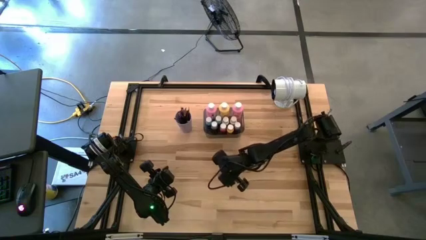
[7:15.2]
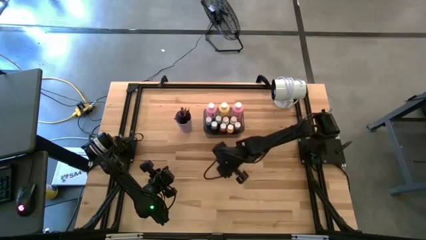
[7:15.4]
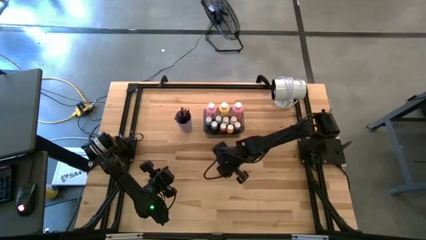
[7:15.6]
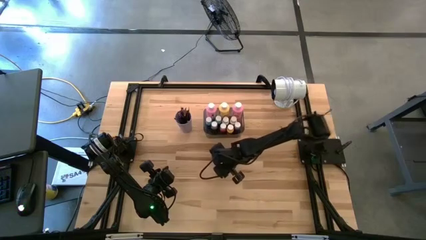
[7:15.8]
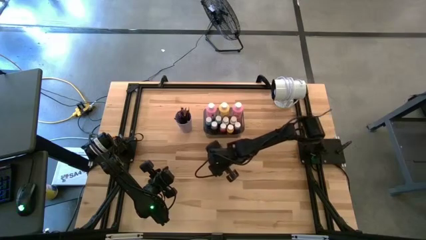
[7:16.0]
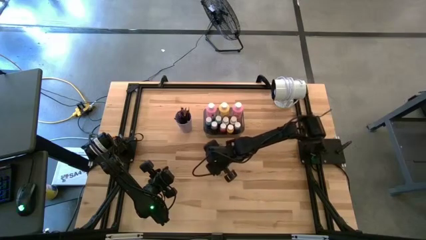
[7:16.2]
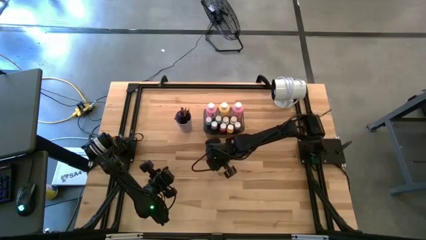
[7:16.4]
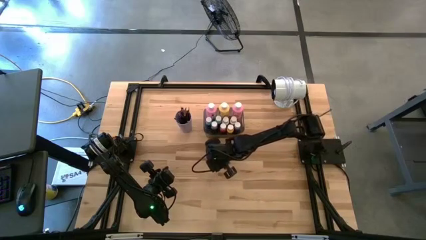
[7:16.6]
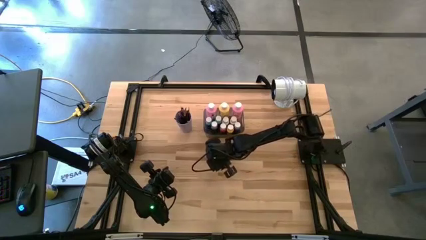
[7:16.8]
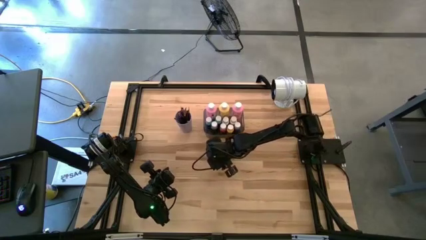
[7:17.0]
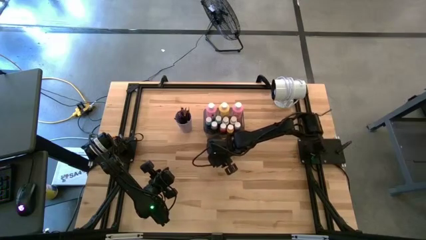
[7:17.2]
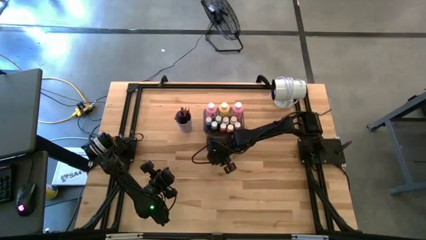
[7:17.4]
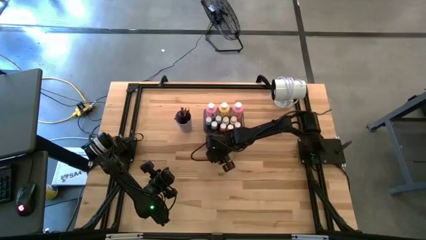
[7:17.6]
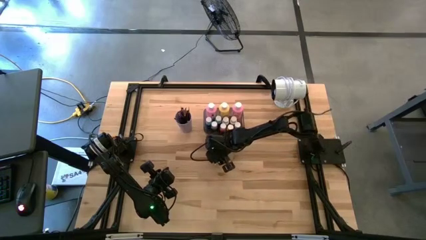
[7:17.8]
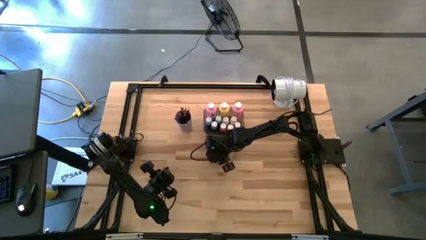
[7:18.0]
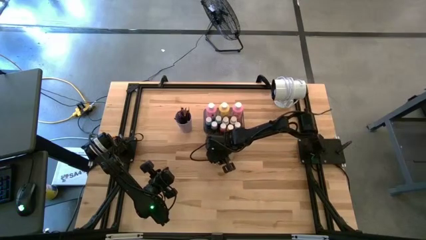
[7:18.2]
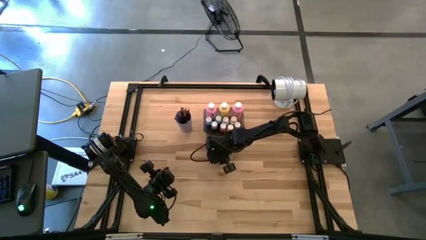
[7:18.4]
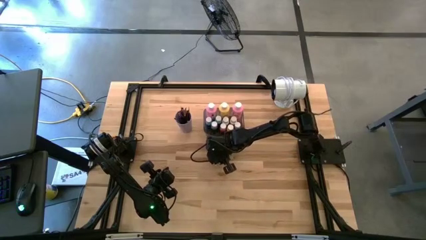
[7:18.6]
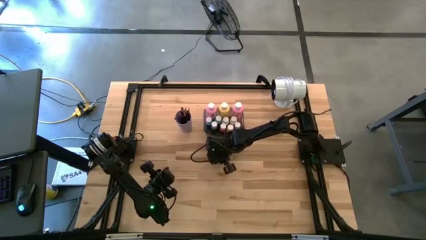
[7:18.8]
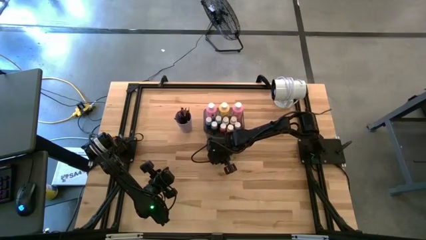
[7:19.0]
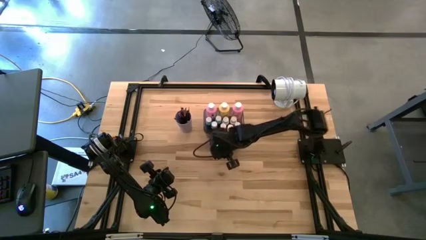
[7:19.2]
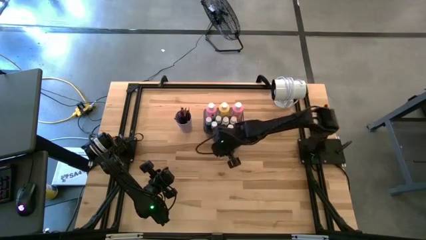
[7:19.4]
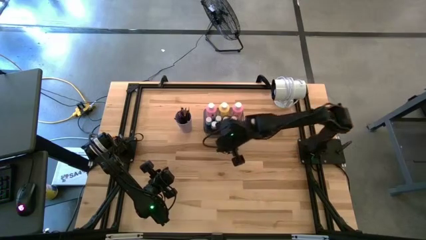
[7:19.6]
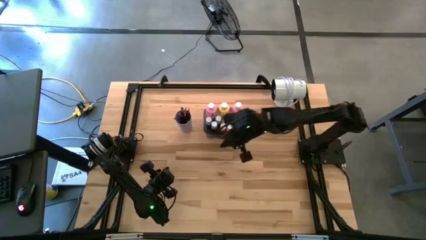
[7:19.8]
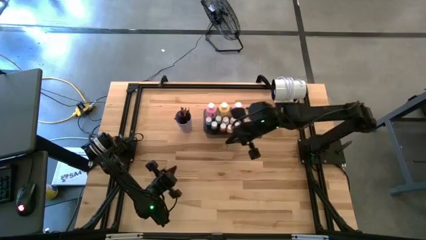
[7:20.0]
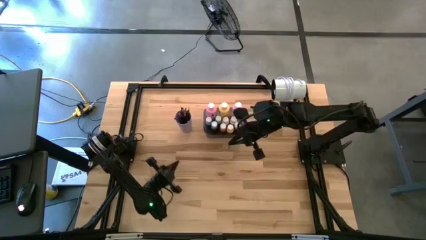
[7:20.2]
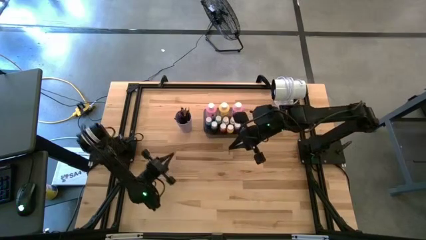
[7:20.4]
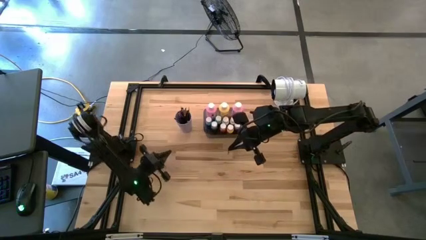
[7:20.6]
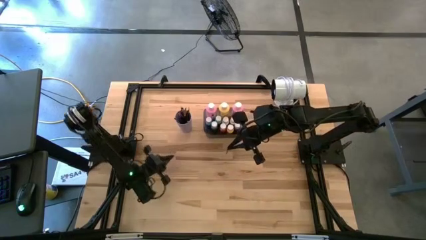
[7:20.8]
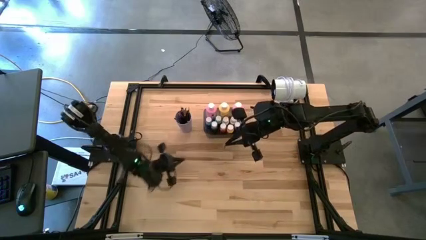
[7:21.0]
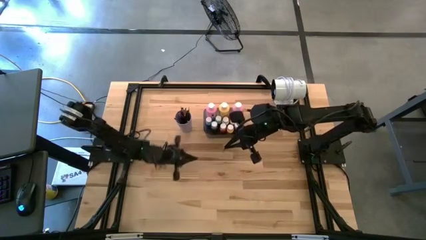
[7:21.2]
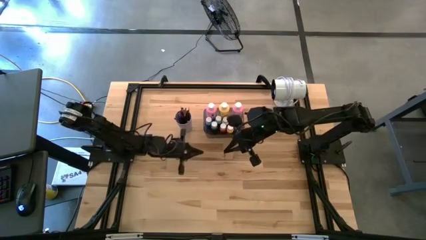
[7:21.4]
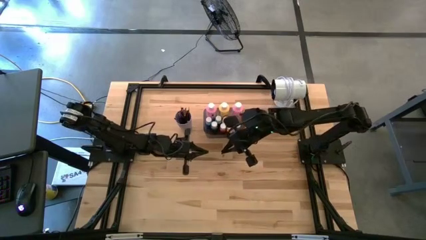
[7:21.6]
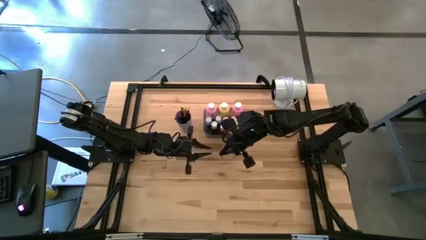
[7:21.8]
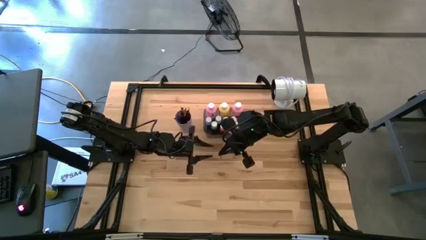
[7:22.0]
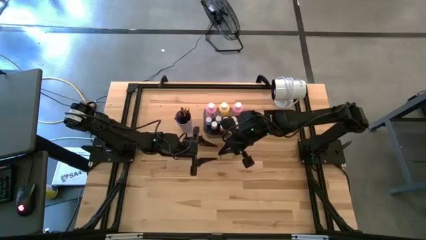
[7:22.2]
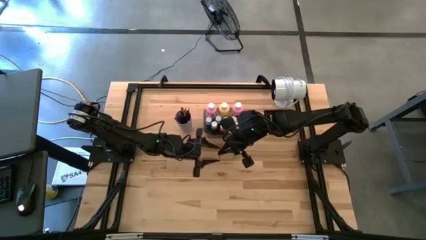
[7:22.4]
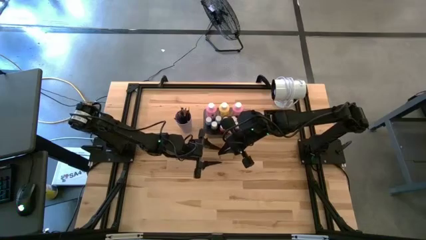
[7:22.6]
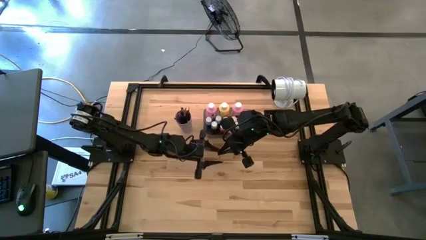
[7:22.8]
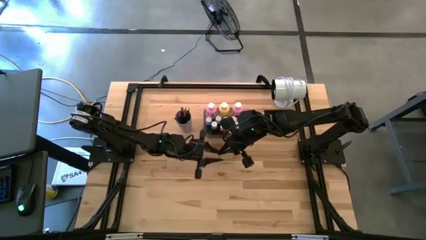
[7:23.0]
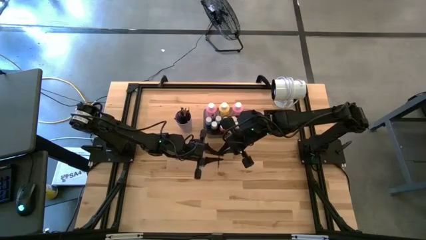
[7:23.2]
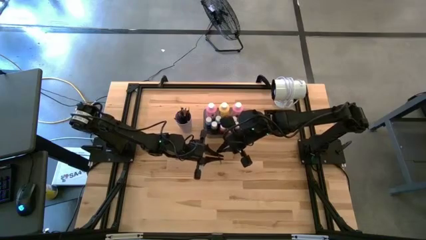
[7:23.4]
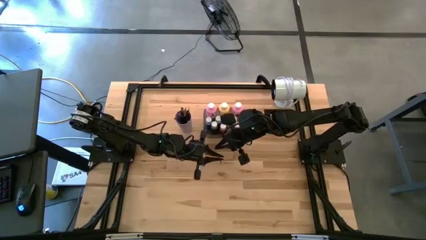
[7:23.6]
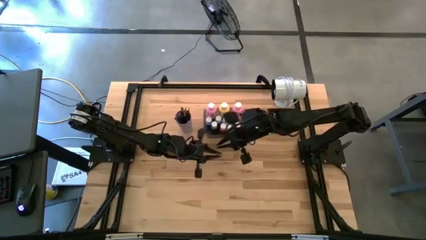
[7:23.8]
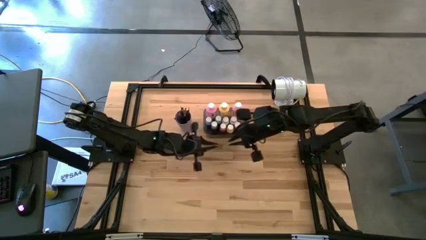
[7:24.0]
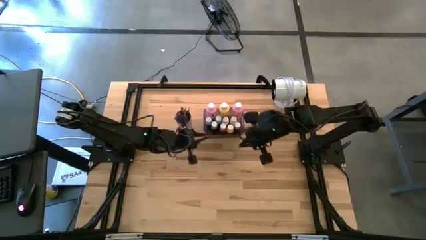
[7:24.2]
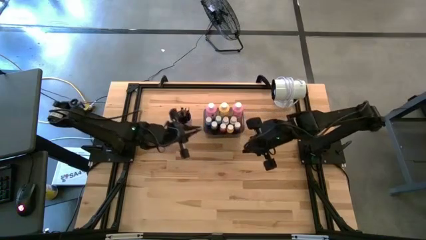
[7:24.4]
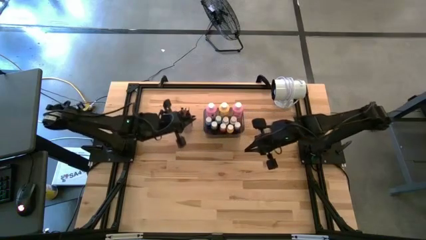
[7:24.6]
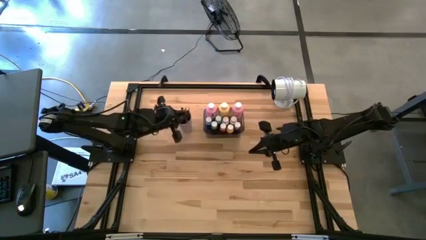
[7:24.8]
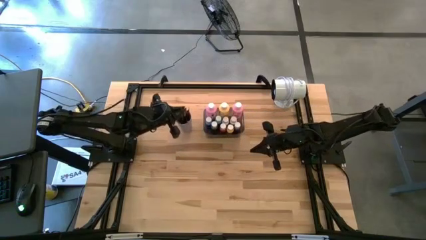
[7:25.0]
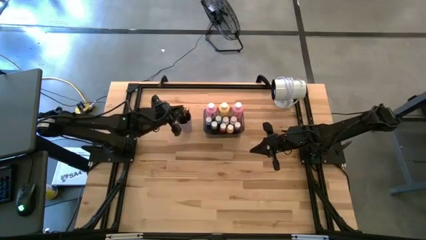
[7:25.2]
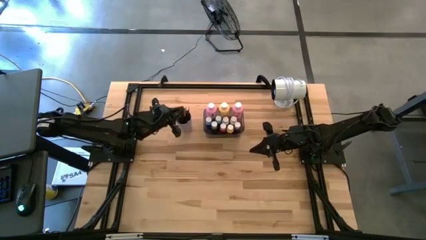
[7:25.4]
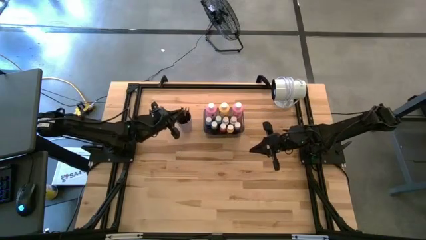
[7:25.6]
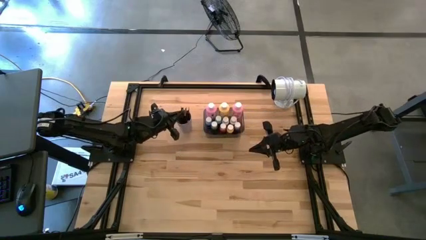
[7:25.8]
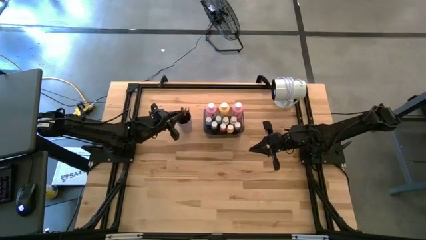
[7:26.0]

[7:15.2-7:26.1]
Task: Pick & Place Paint Supplies
Put the silver paint brush into the purple cup

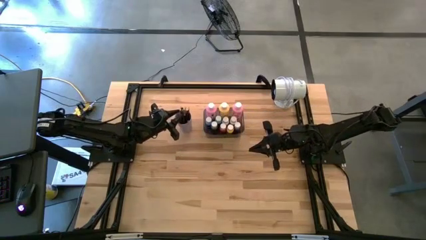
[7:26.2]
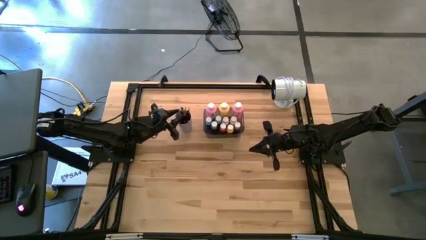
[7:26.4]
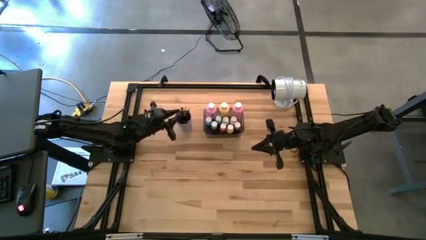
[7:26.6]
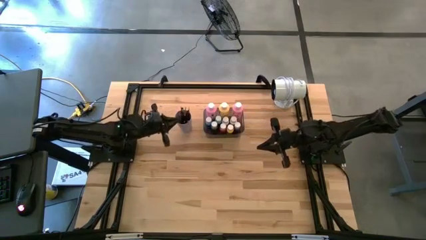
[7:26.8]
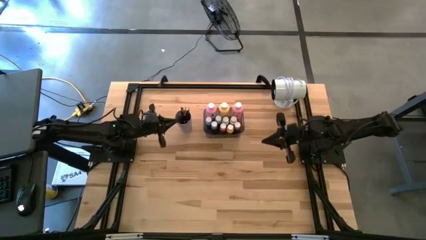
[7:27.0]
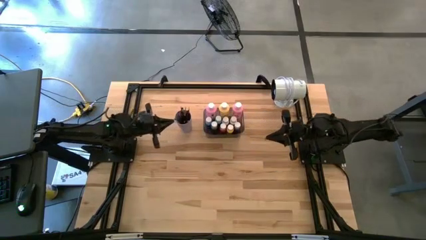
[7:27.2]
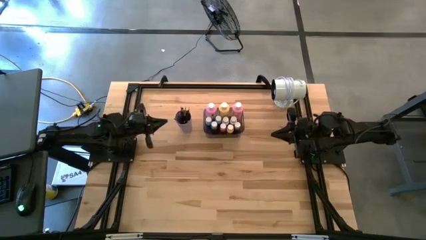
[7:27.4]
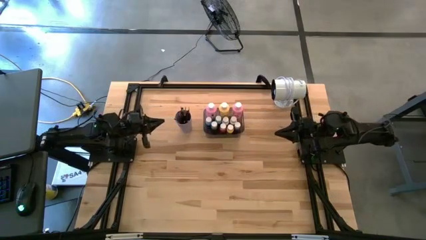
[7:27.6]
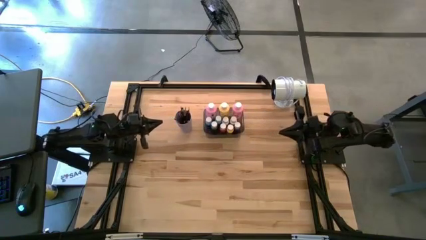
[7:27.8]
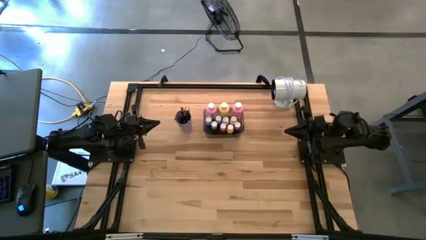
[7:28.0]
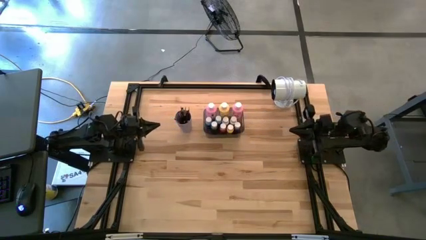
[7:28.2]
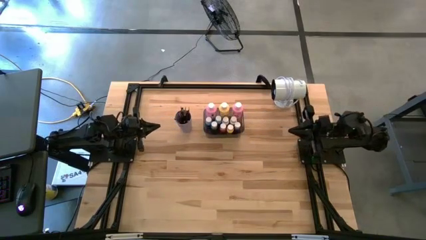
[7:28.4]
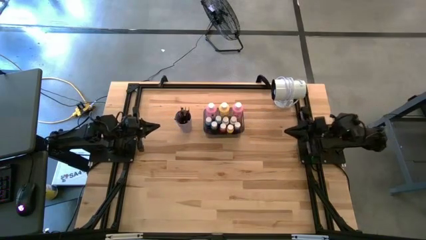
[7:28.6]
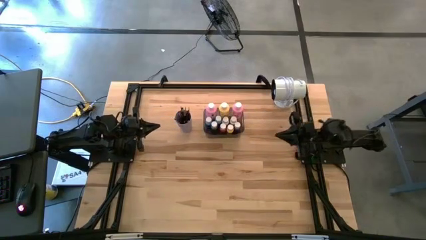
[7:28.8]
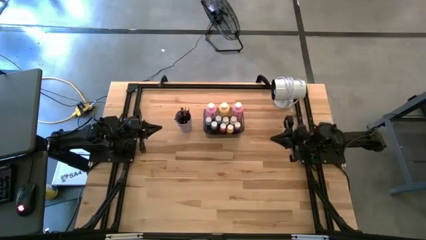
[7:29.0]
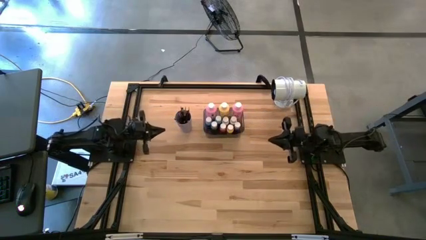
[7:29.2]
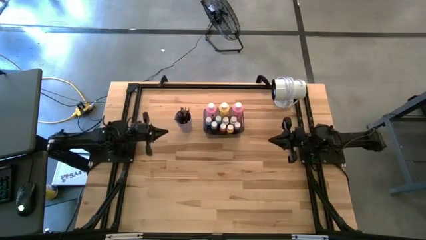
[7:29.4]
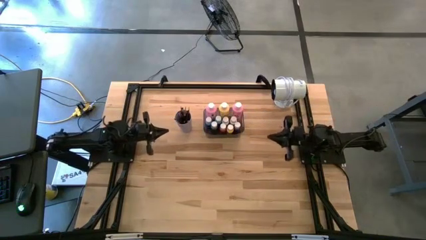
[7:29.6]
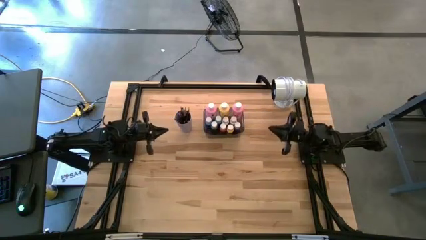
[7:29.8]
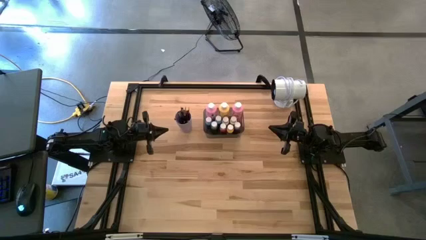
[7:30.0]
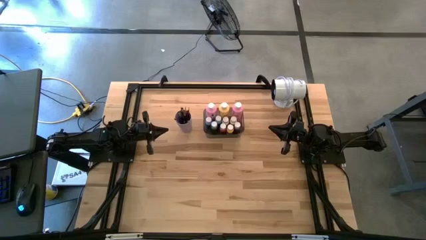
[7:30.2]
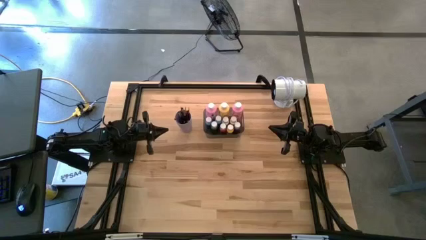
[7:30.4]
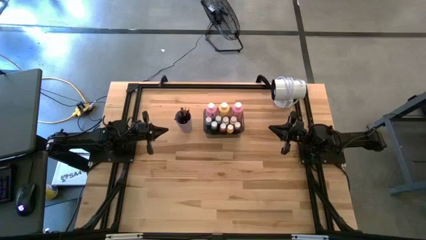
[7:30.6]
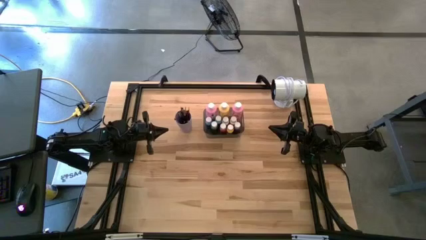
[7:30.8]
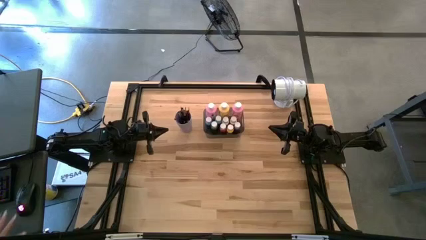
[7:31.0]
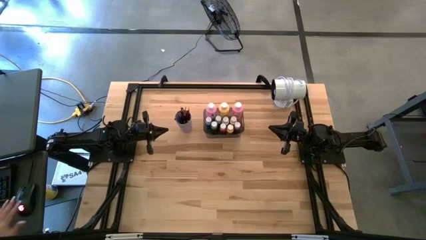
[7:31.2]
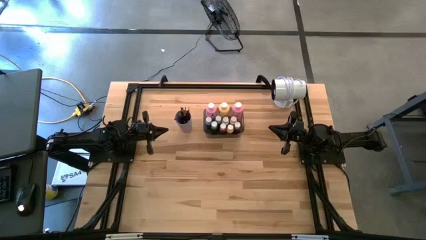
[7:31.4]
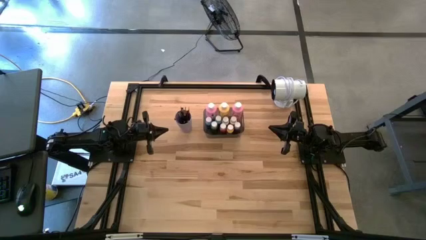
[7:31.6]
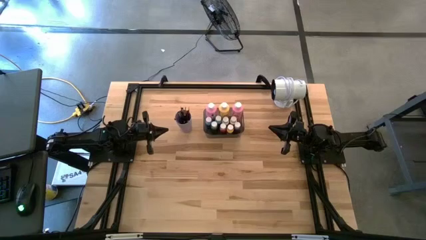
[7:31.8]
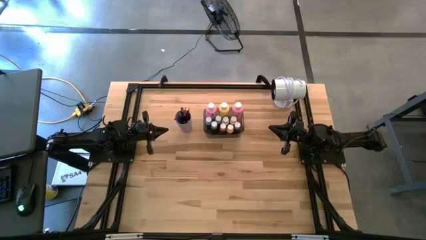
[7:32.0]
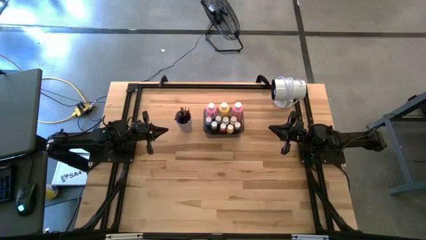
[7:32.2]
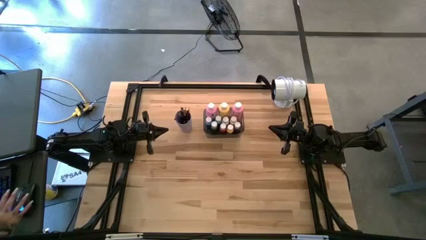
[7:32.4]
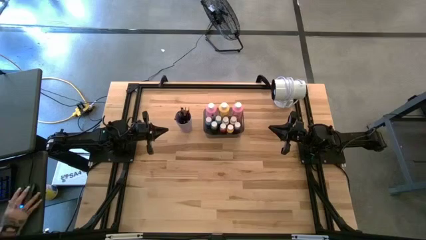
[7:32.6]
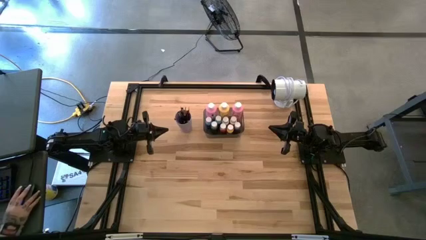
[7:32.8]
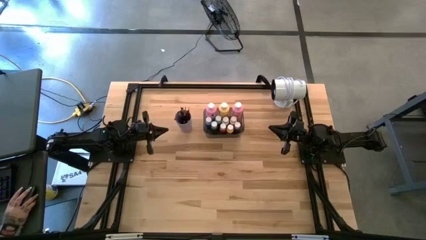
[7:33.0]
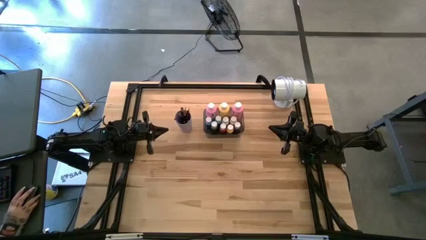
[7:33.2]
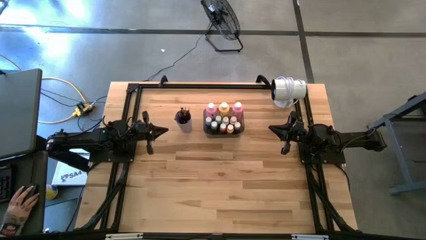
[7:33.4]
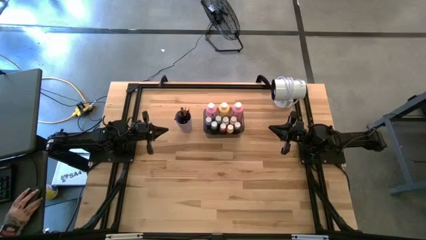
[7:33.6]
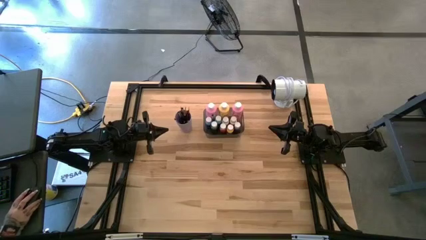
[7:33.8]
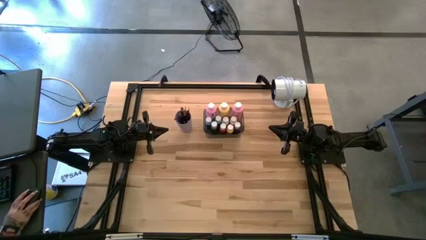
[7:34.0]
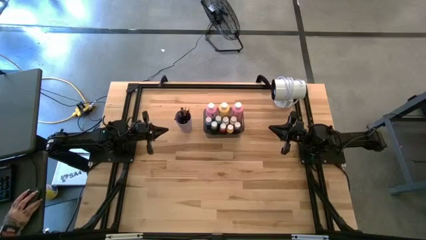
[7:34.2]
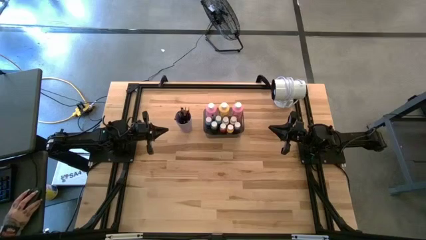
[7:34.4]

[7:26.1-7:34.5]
Return to Home Position
